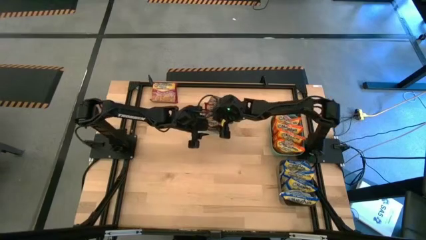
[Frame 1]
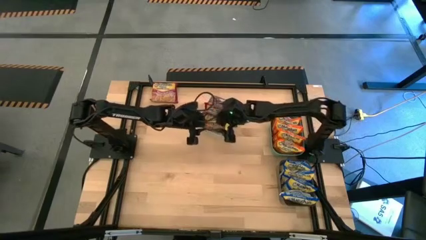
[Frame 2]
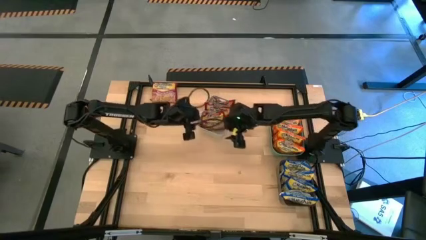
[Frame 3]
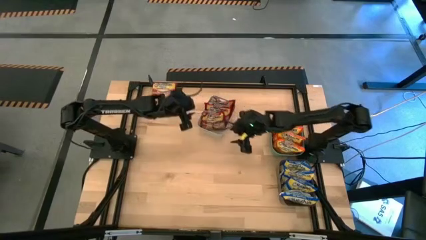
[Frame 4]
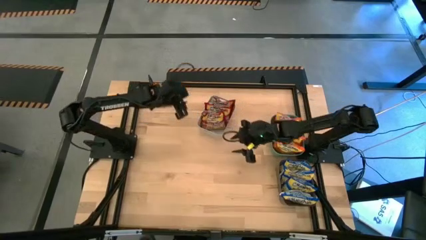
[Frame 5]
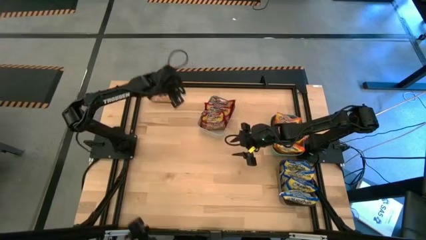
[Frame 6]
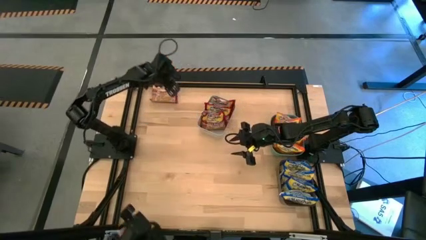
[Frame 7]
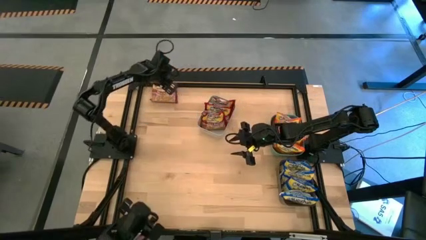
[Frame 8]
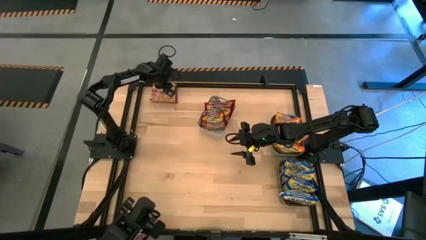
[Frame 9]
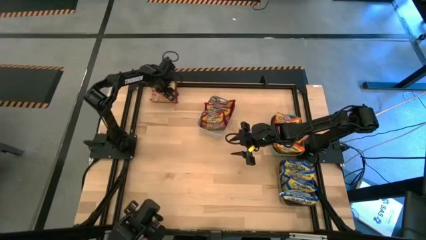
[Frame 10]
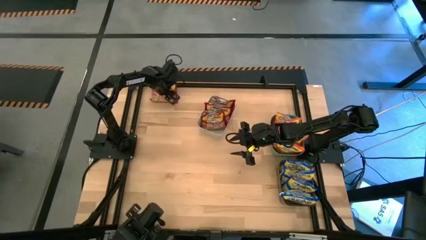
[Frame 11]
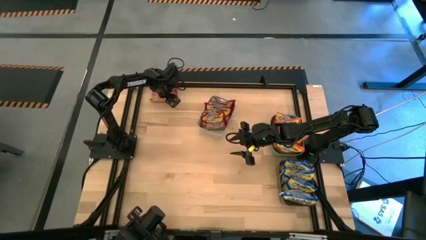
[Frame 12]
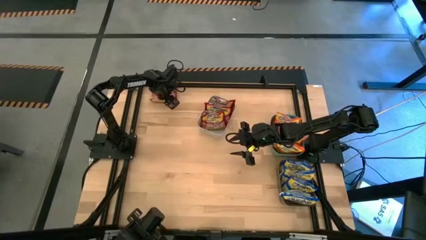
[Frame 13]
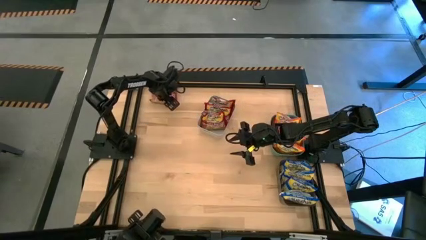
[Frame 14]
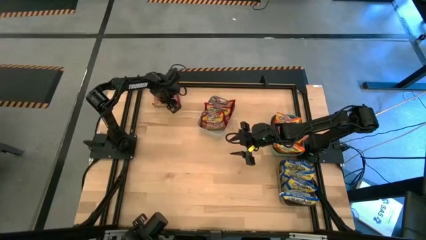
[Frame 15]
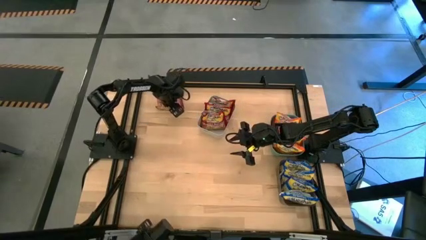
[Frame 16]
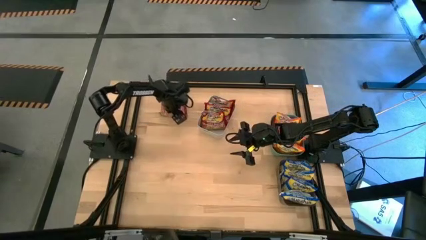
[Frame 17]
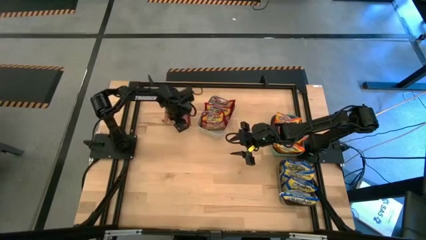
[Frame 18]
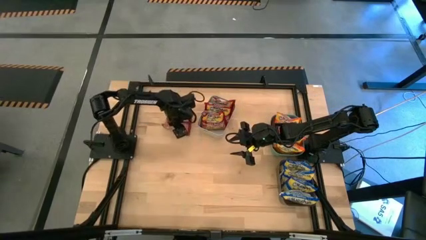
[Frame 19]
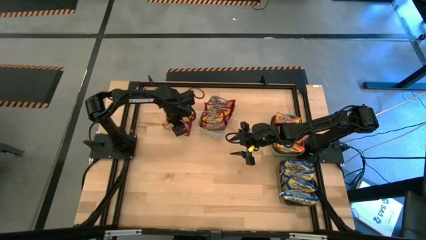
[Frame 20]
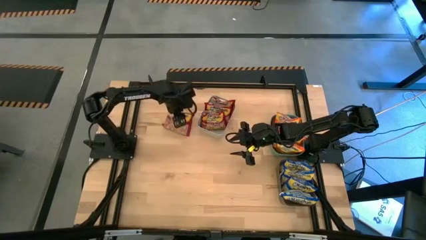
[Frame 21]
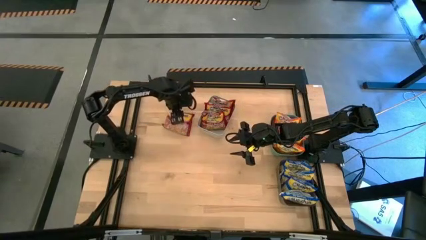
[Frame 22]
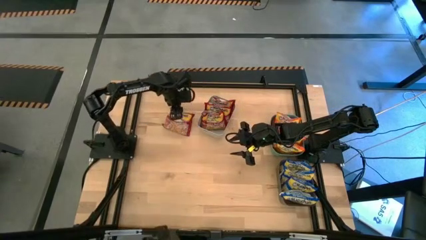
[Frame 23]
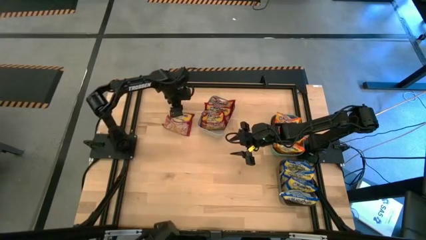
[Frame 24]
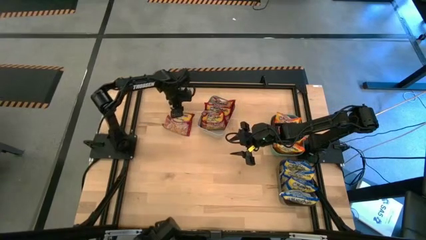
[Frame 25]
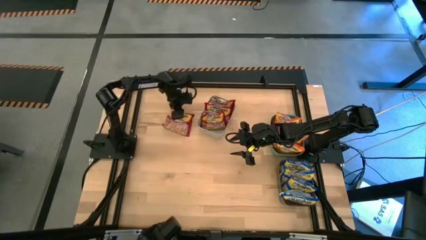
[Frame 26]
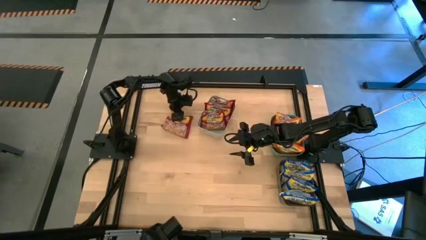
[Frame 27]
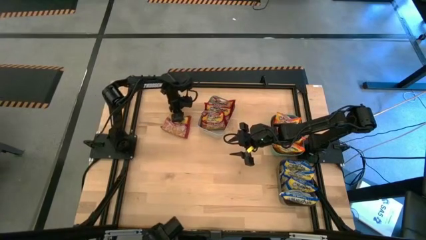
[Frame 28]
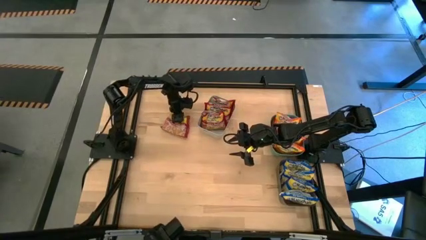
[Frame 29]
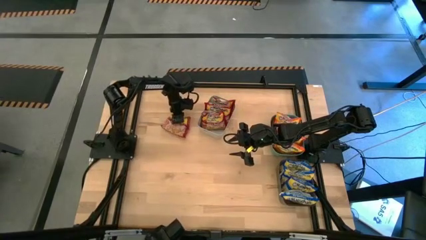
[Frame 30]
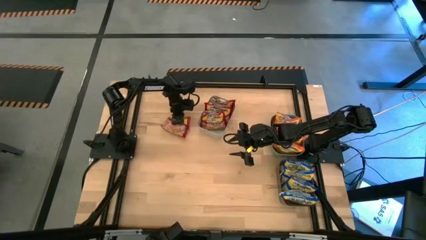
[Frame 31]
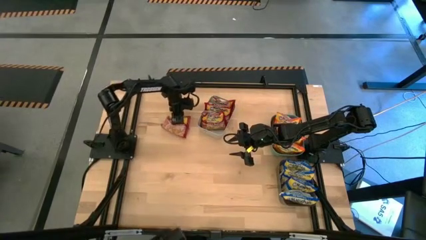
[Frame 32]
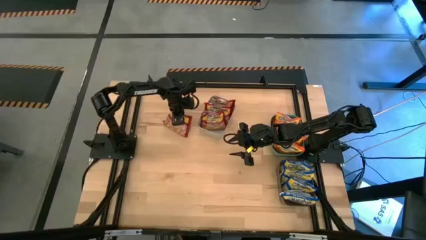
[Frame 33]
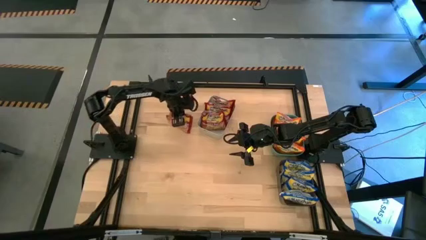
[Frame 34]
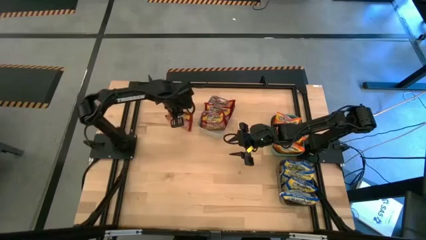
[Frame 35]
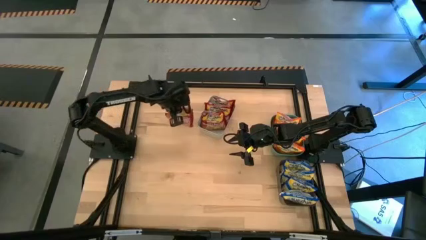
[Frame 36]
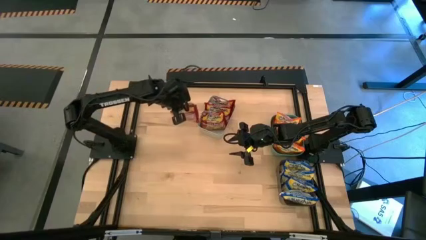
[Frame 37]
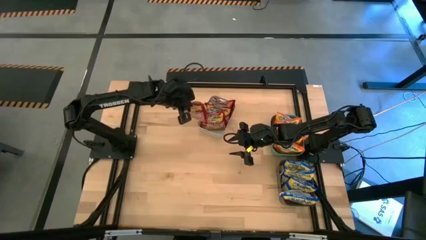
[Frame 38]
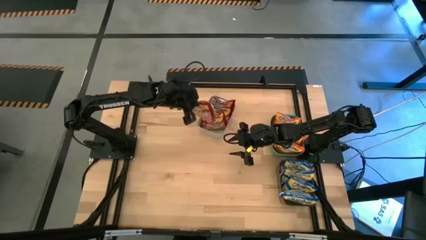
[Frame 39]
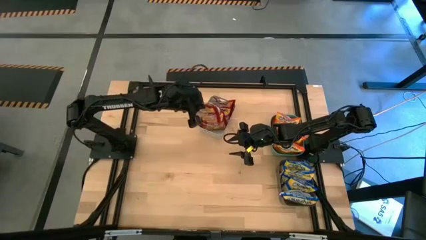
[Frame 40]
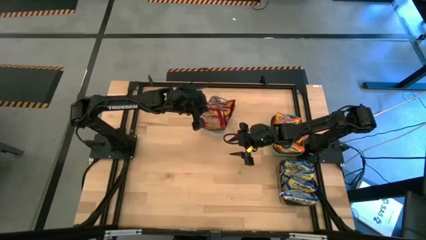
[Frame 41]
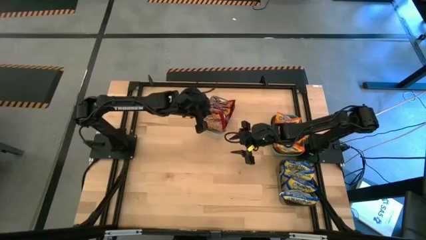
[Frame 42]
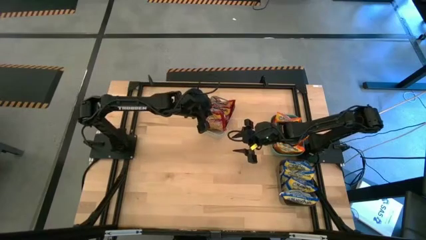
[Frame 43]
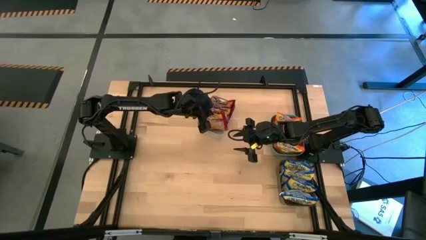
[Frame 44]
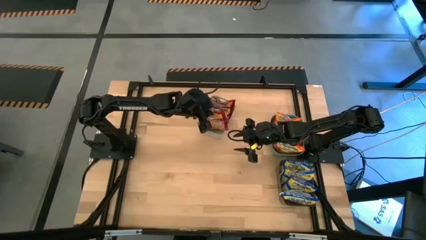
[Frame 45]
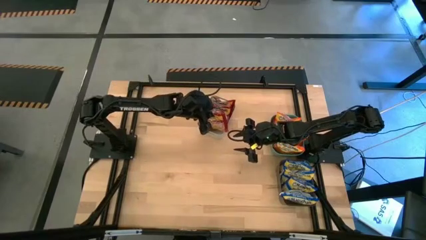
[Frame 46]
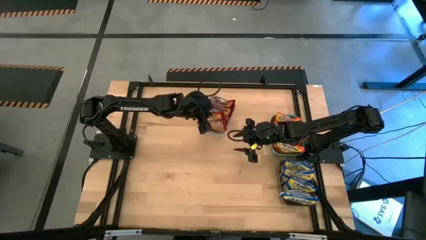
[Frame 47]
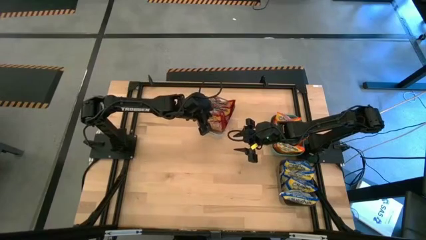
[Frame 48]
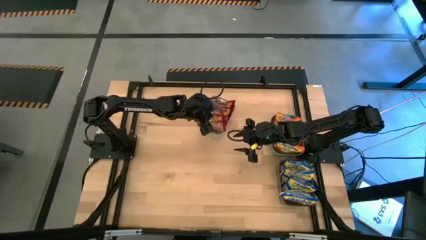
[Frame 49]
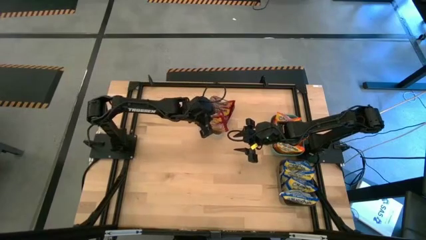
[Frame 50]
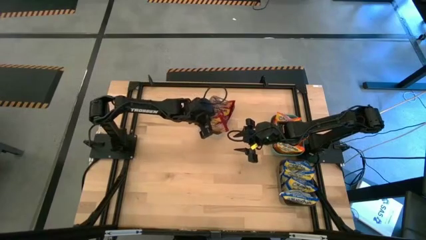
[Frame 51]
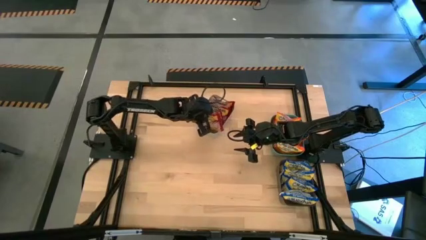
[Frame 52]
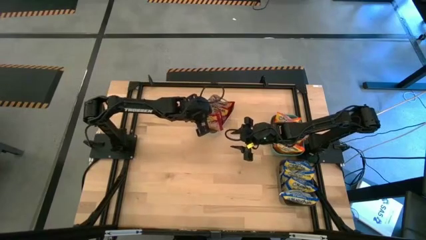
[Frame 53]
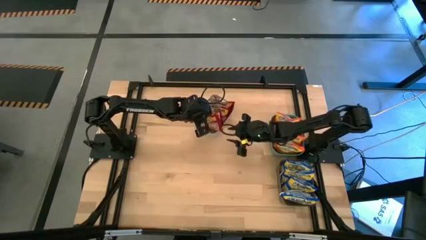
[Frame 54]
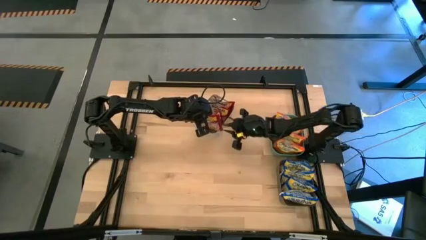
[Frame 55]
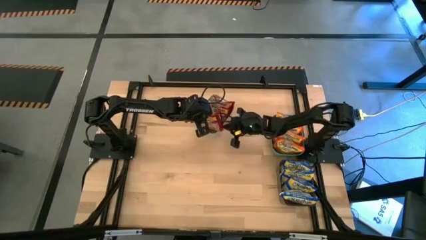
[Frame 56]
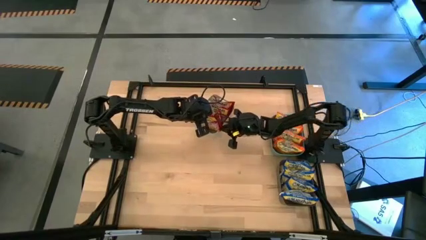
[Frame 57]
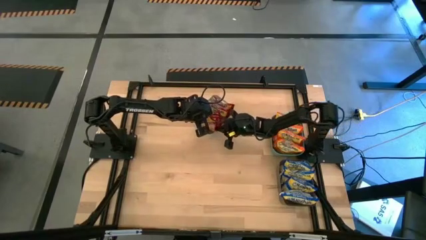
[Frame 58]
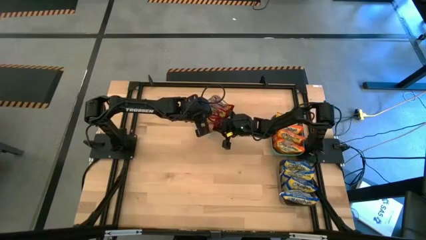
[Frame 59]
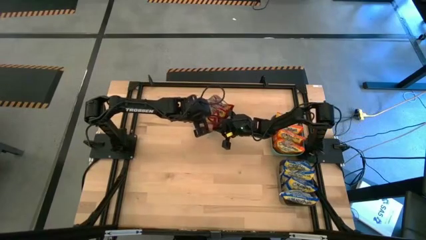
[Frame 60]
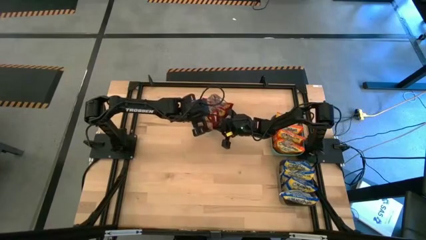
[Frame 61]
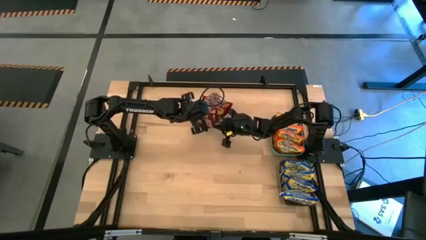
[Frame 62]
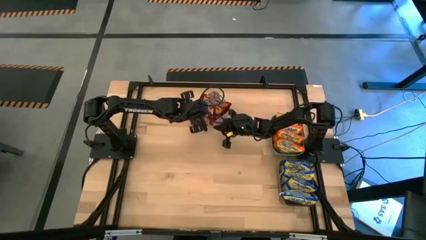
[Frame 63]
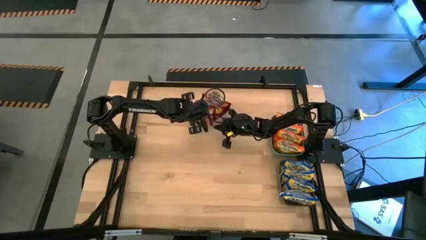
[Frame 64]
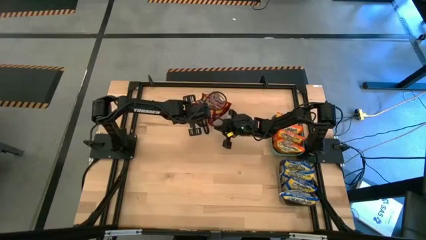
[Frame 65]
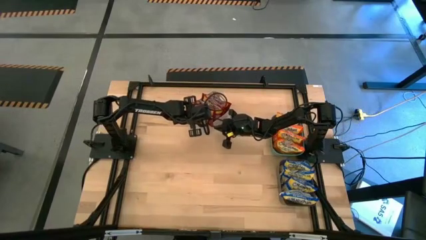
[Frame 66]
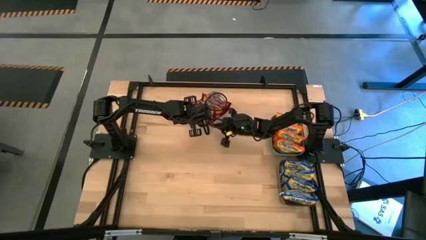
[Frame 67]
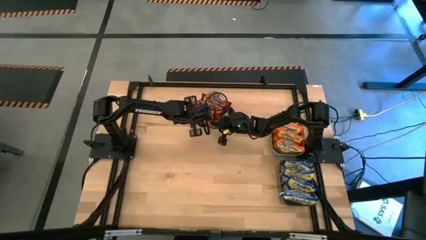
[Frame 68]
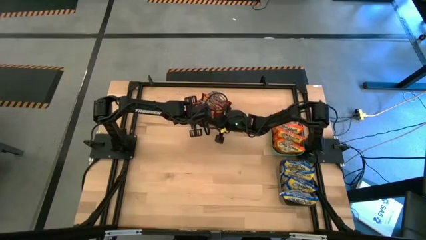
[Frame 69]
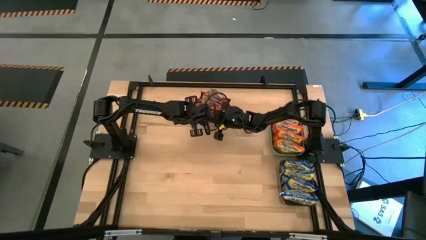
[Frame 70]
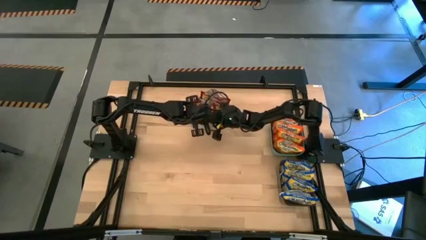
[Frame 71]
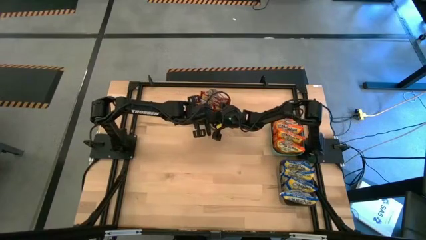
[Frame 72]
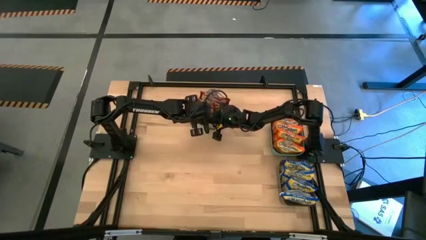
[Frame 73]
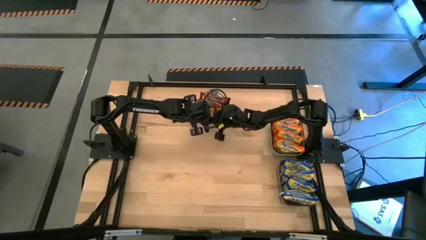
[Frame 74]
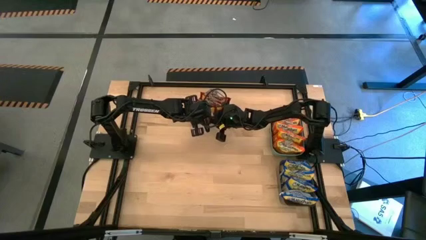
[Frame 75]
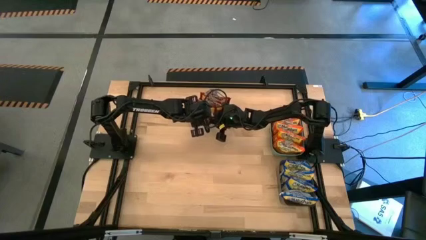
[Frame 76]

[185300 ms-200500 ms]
Task: Sort Maruchan noodles
Put the red noodle pack into the white bin

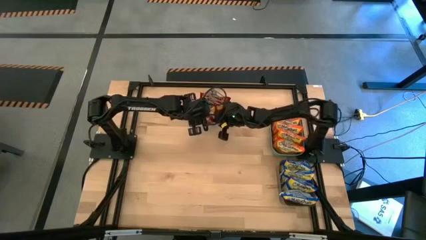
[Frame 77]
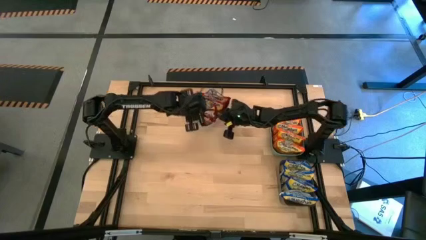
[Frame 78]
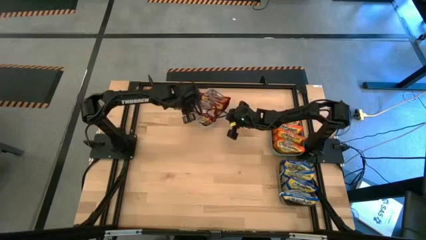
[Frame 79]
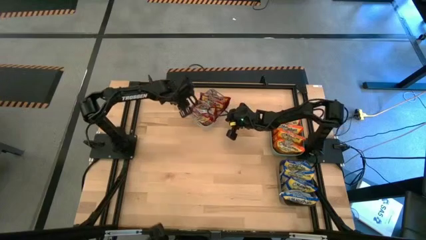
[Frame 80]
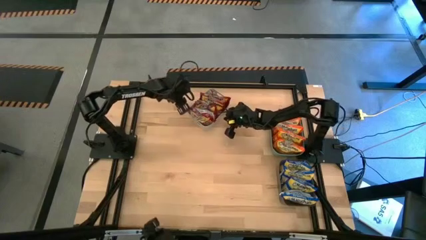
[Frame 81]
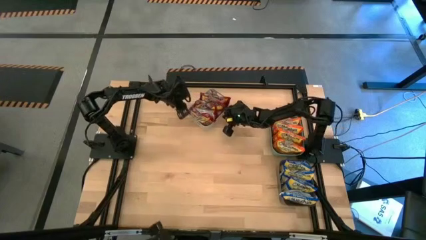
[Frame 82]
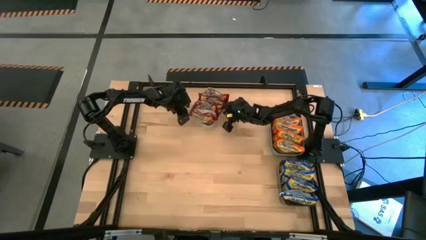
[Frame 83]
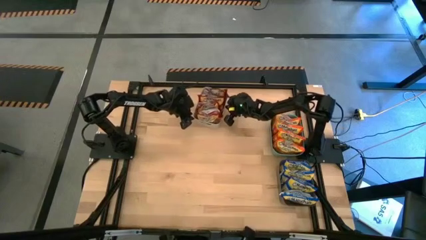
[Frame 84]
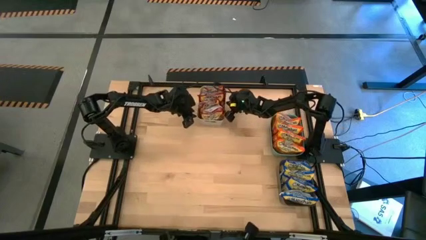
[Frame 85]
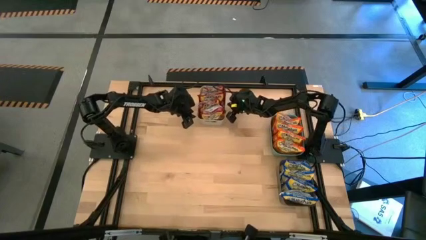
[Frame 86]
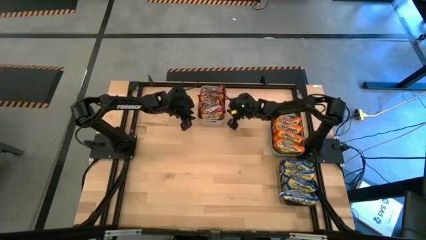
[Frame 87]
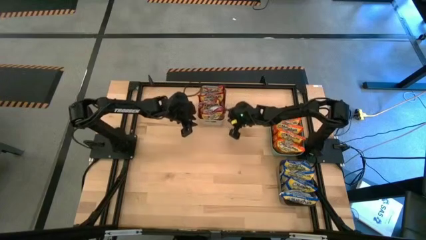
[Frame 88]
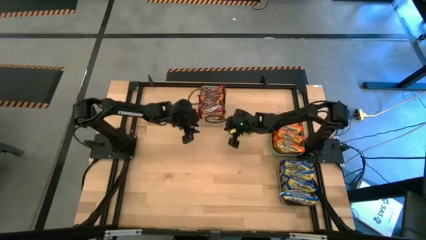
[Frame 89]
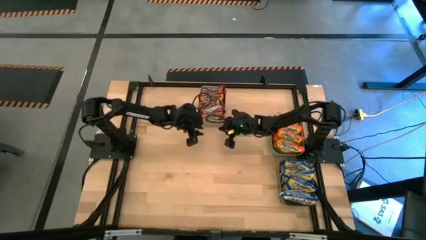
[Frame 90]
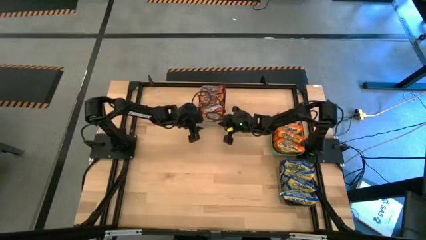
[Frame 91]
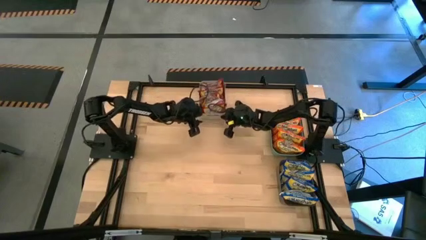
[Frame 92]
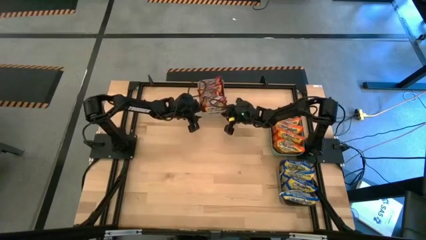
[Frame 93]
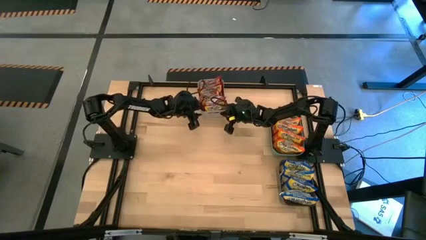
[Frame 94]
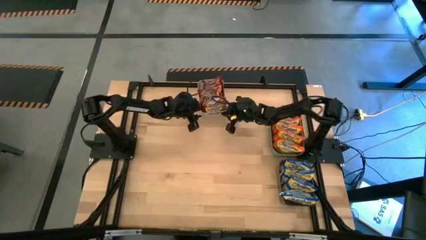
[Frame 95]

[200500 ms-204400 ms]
Adjust the white bin
